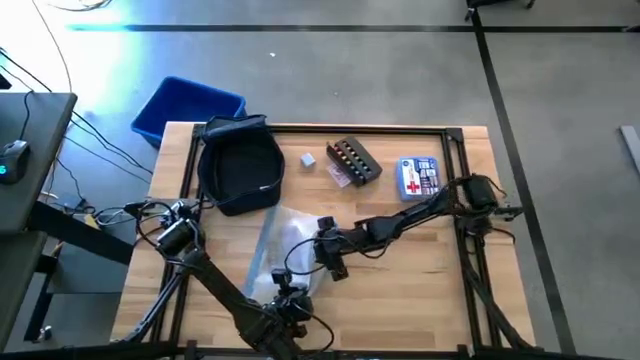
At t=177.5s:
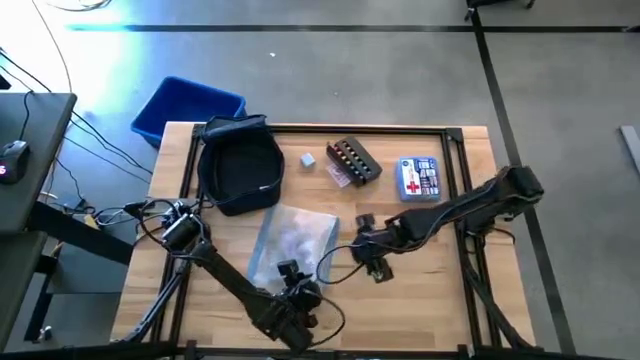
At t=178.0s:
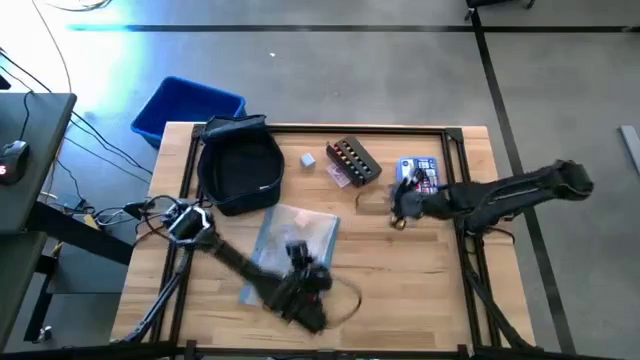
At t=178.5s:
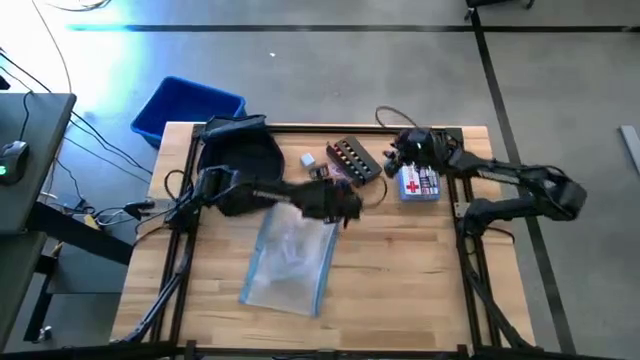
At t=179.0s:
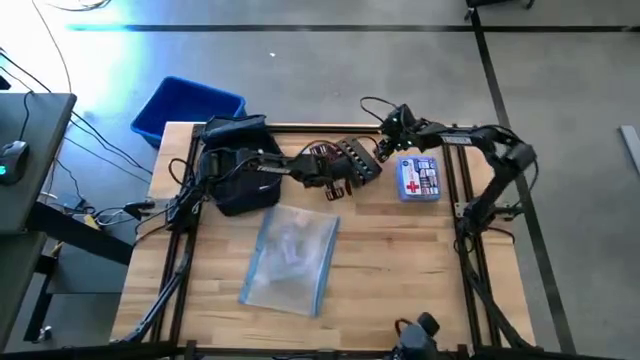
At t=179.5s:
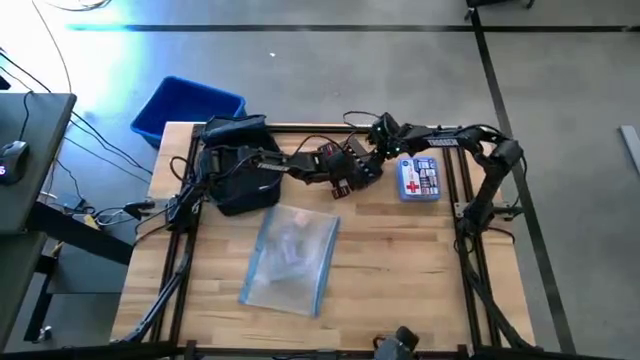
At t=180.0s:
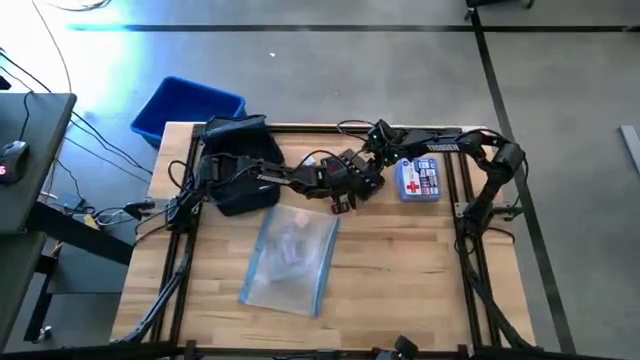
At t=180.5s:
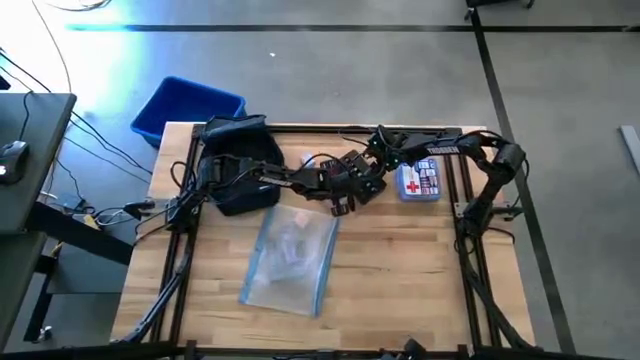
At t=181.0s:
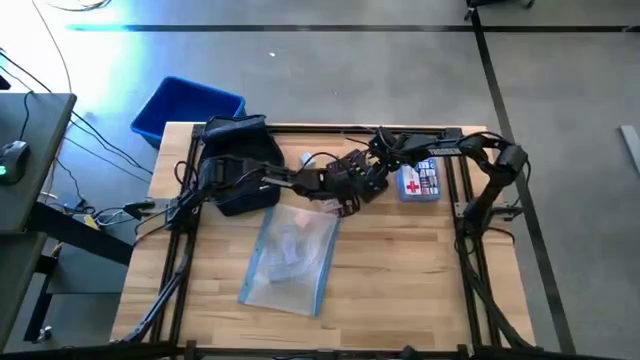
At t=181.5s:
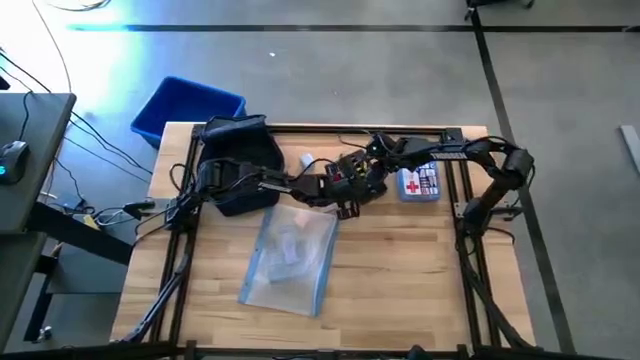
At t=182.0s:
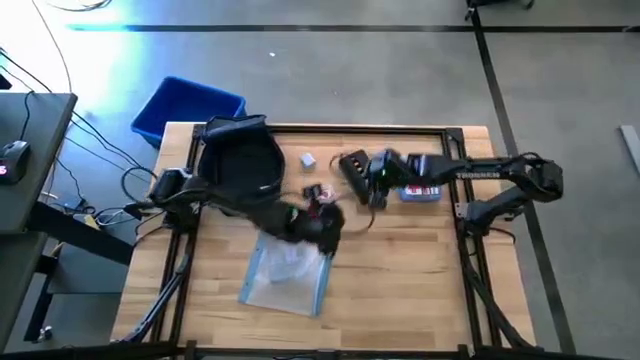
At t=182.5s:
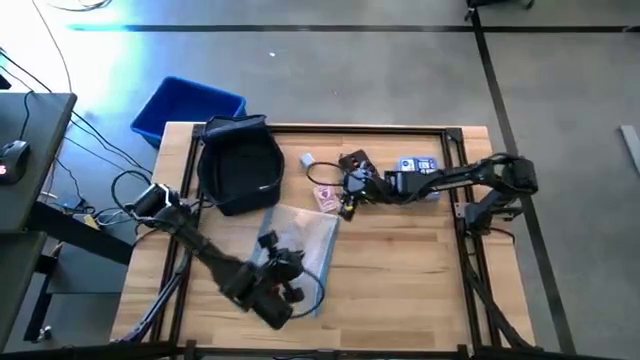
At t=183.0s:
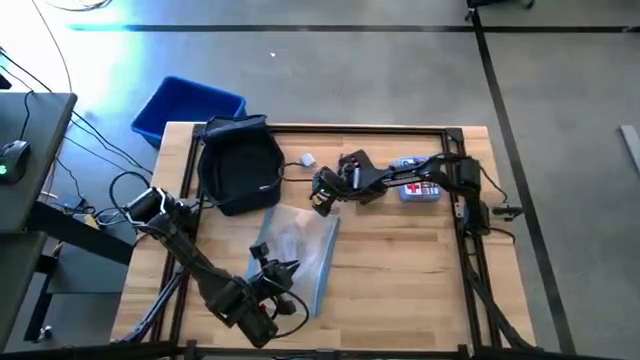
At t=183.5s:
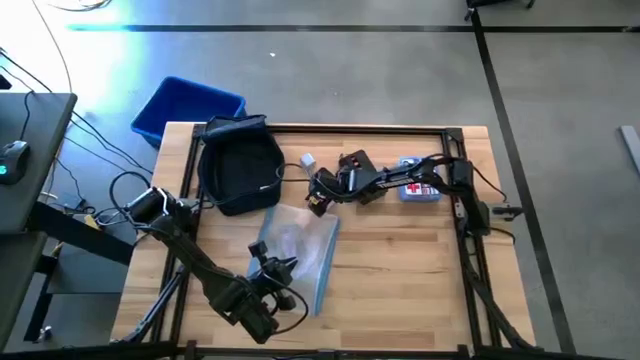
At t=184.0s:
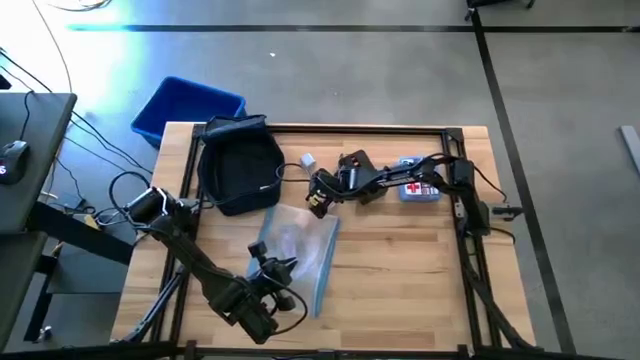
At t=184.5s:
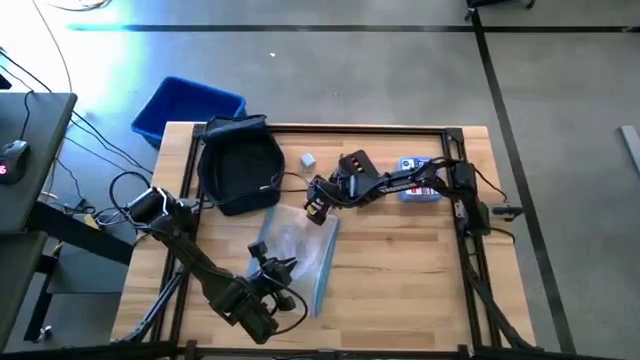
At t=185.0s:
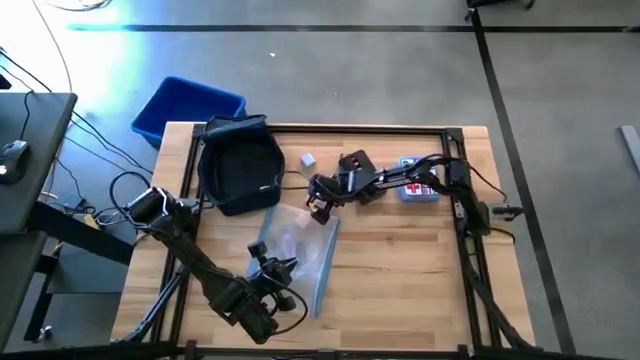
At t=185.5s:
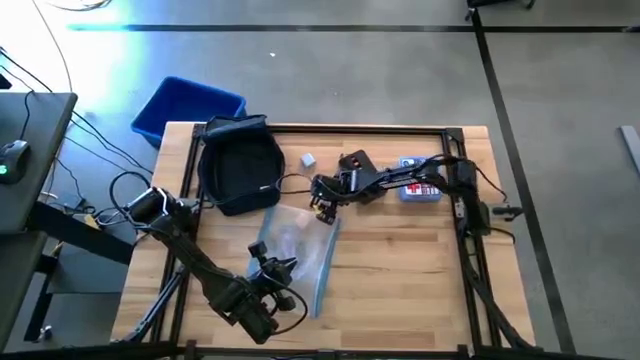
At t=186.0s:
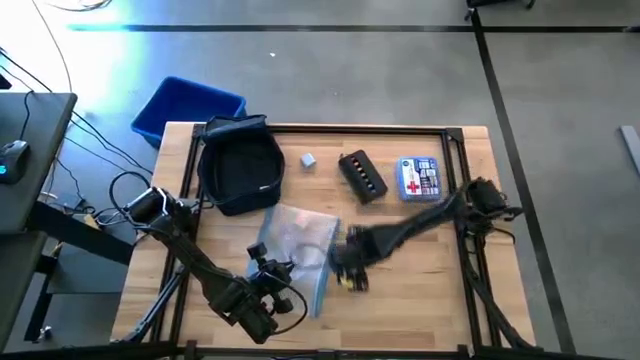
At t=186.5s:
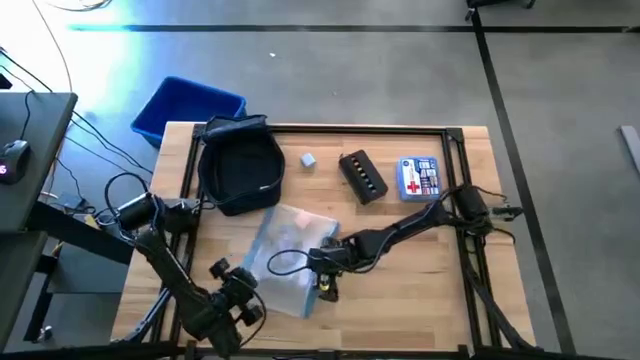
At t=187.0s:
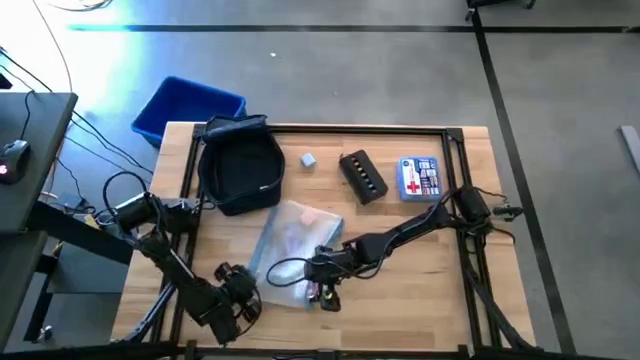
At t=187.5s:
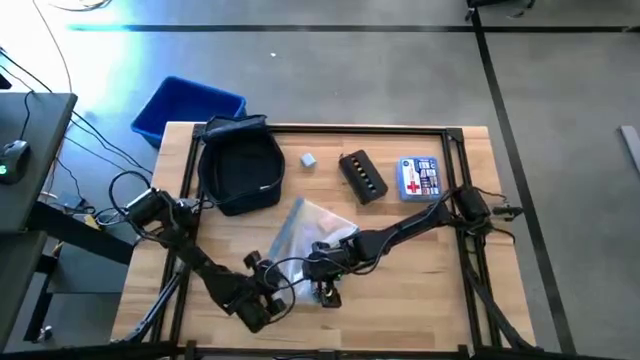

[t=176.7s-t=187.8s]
Task: Unpack backpack
Put the white playing card box into the white zip bag

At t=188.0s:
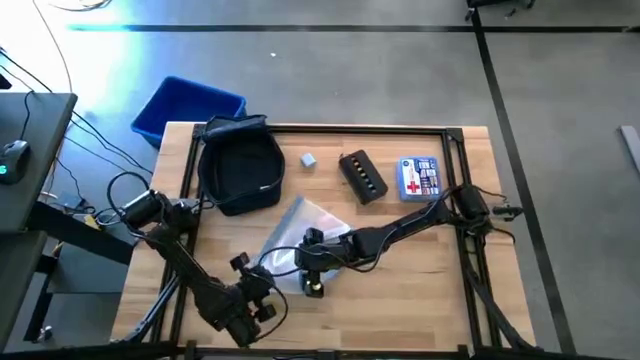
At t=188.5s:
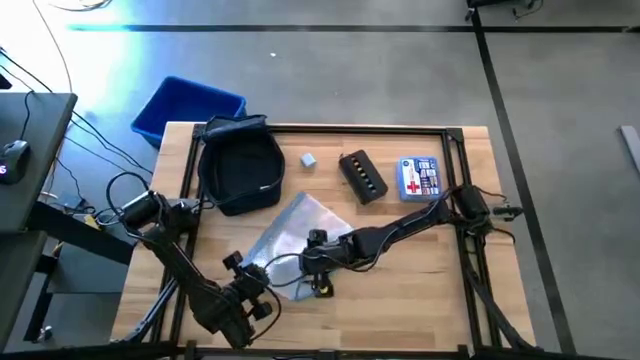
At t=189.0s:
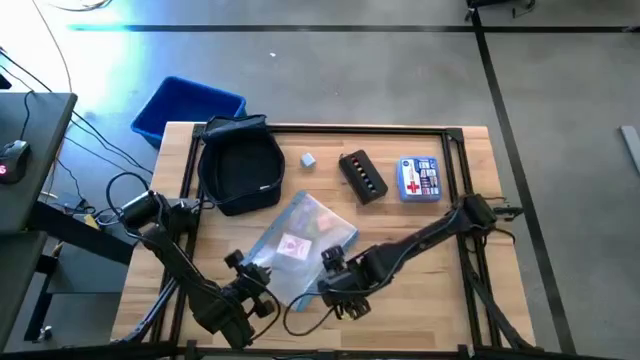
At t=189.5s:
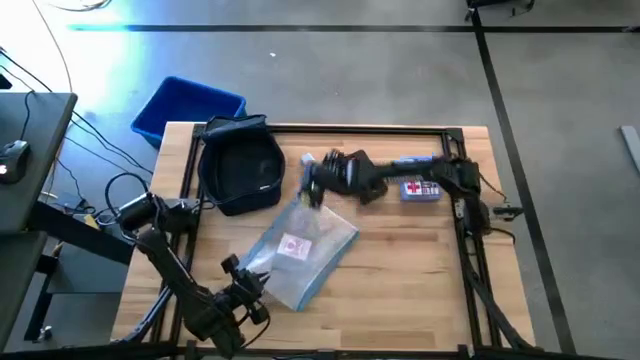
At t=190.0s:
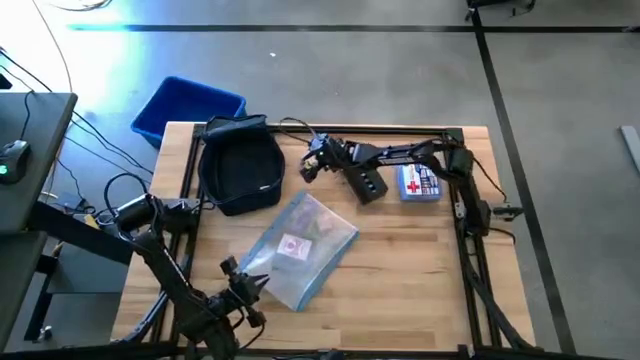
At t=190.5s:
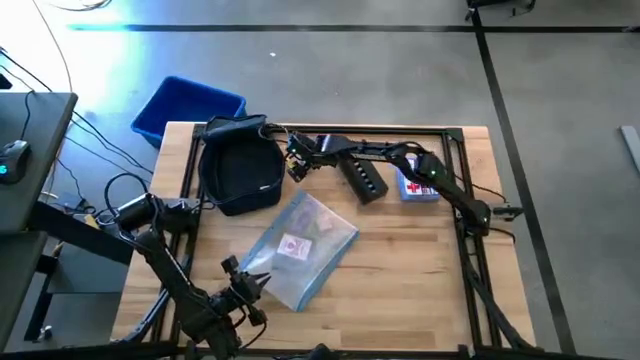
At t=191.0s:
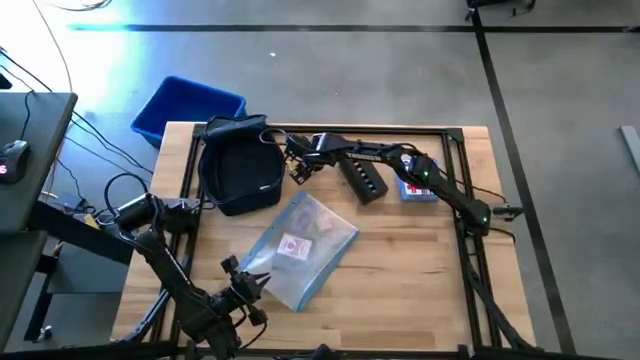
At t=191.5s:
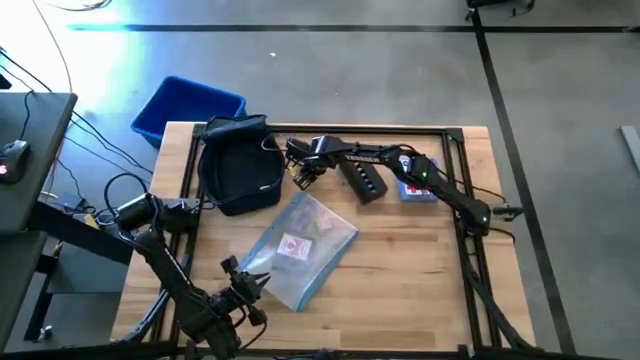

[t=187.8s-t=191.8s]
Put the white adapter into the white zip bag

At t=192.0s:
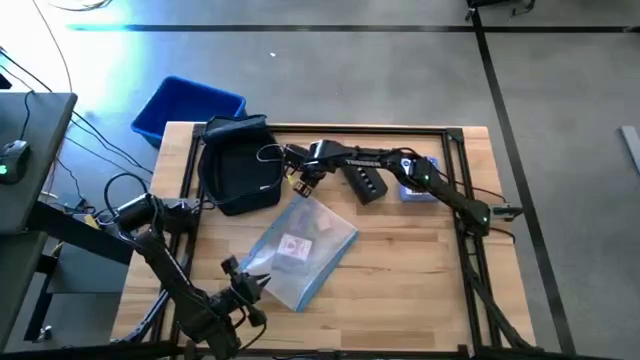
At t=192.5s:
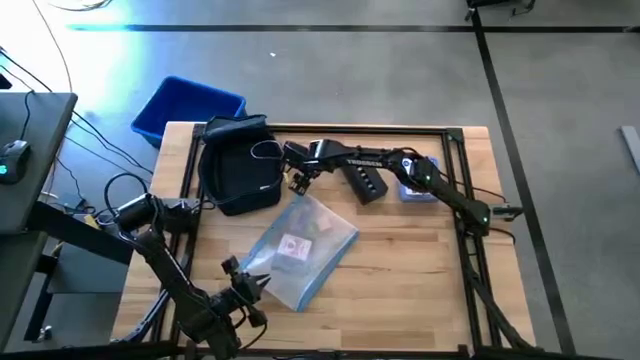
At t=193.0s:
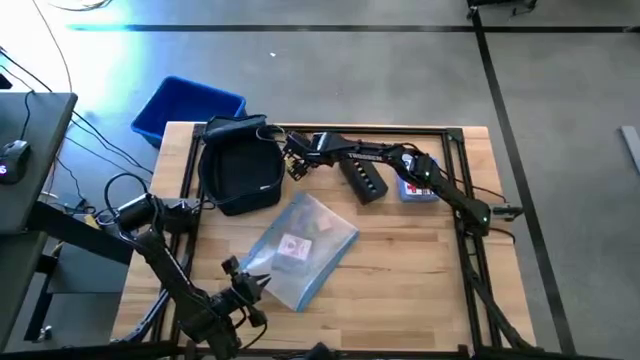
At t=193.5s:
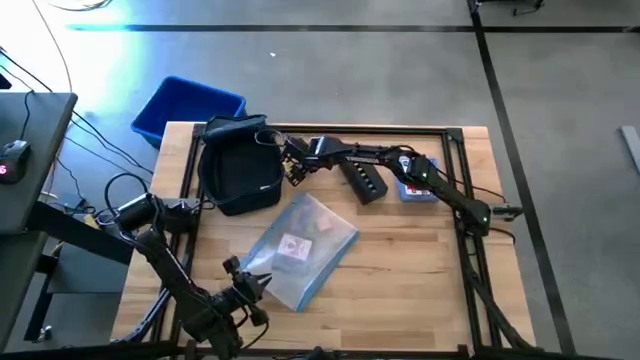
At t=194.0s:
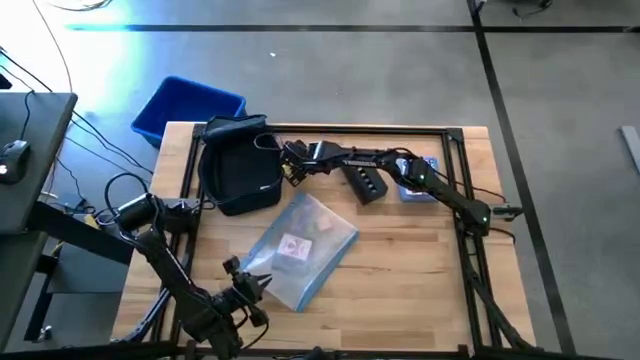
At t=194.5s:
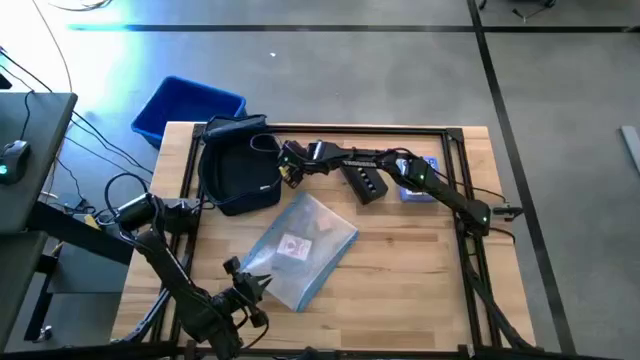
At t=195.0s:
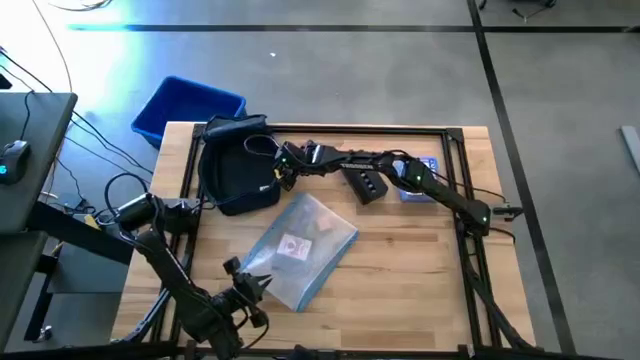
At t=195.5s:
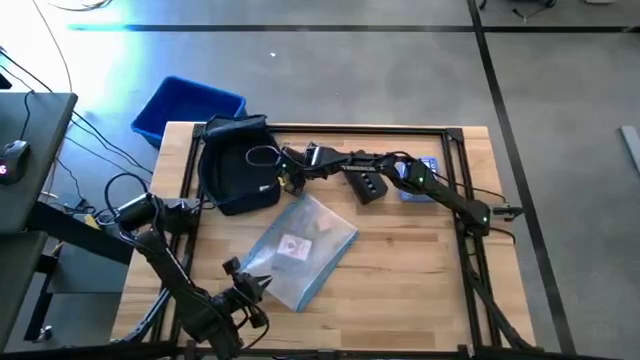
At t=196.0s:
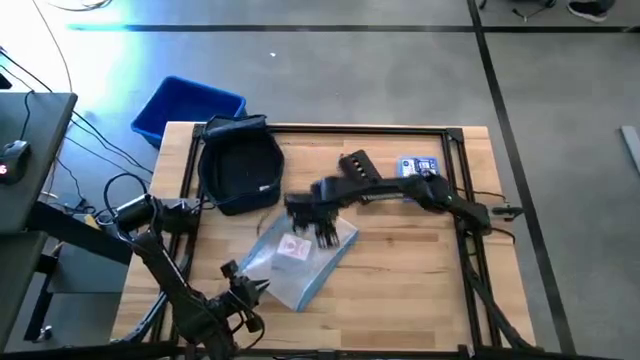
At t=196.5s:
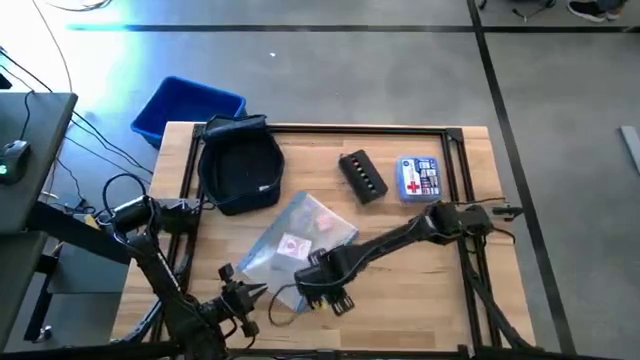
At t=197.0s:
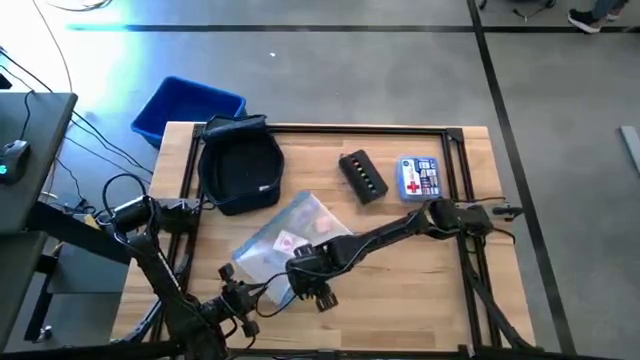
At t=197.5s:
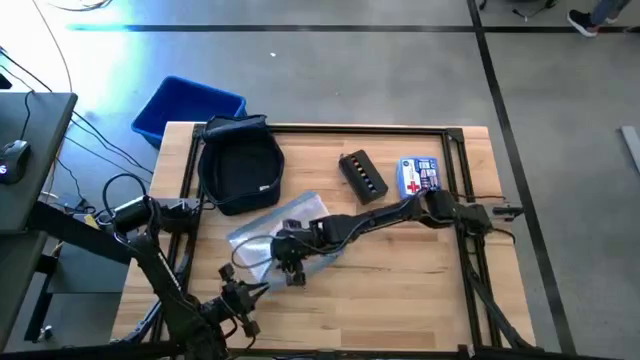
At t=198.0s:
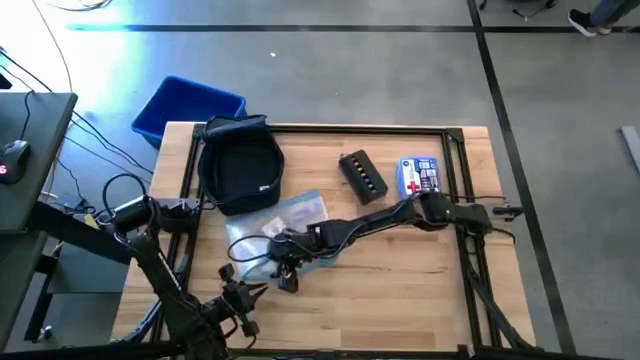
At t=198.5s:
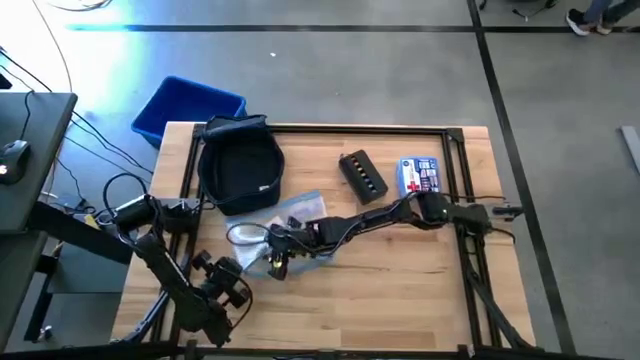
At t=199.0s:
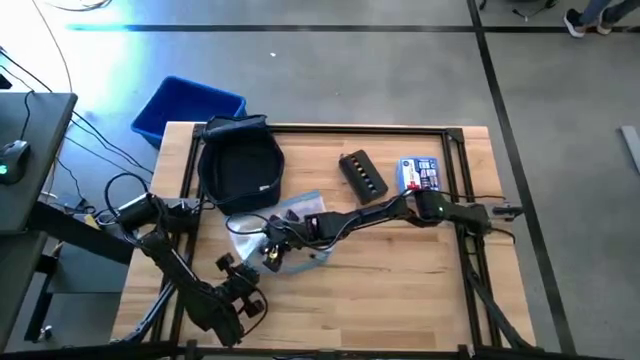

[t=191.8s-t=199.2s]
Put the white adapter into the white zip bag
